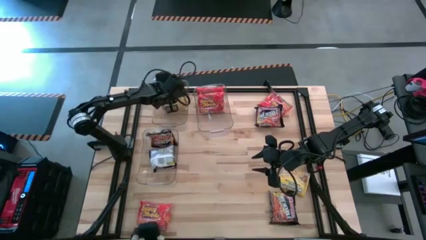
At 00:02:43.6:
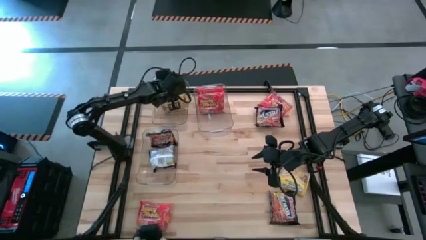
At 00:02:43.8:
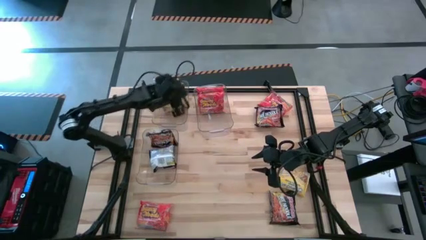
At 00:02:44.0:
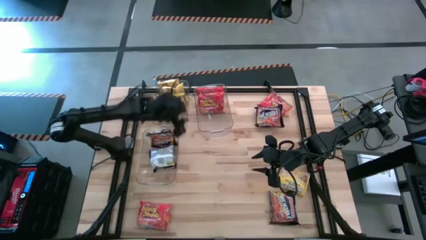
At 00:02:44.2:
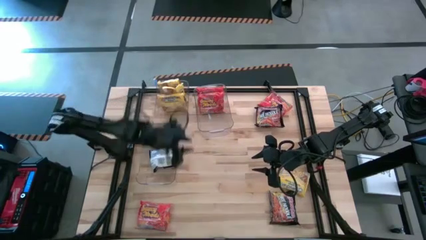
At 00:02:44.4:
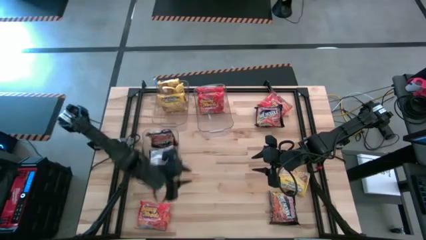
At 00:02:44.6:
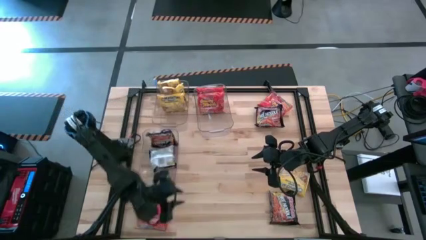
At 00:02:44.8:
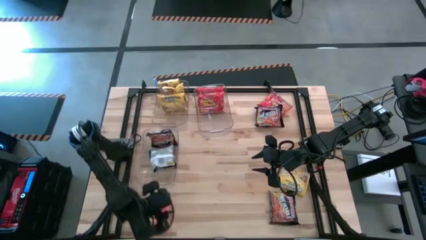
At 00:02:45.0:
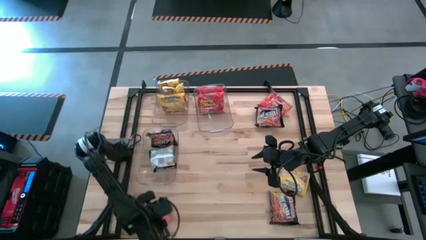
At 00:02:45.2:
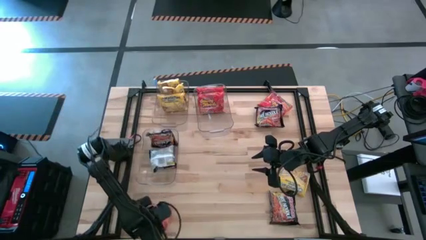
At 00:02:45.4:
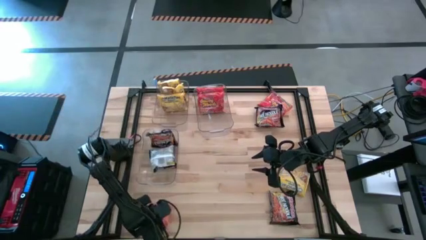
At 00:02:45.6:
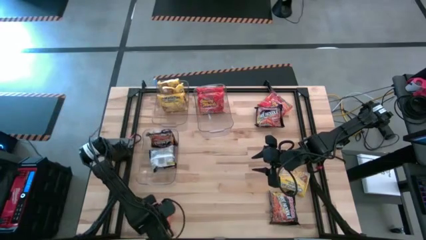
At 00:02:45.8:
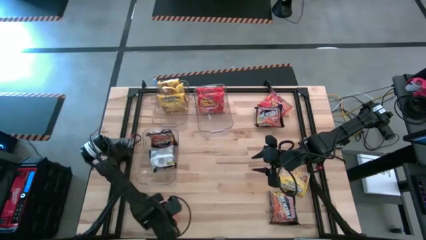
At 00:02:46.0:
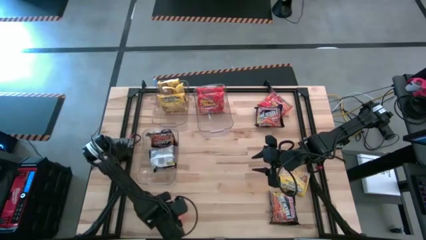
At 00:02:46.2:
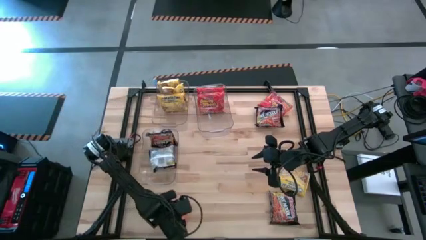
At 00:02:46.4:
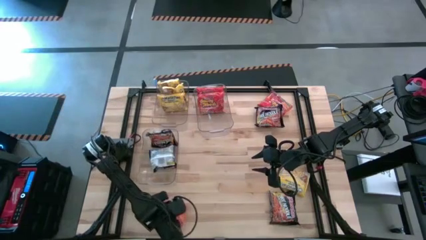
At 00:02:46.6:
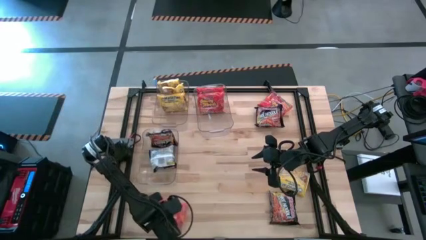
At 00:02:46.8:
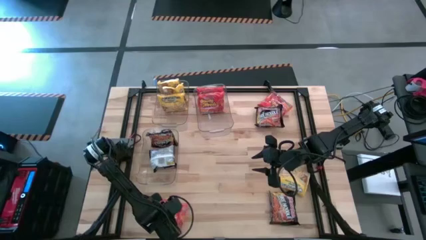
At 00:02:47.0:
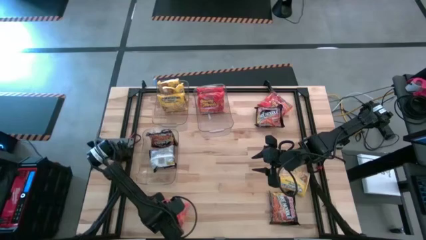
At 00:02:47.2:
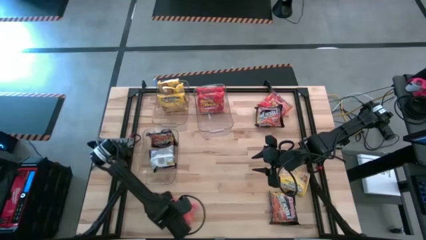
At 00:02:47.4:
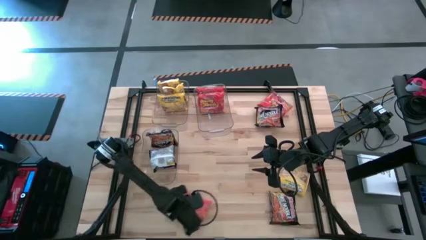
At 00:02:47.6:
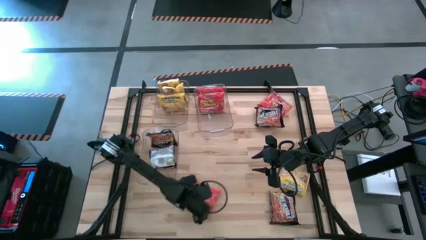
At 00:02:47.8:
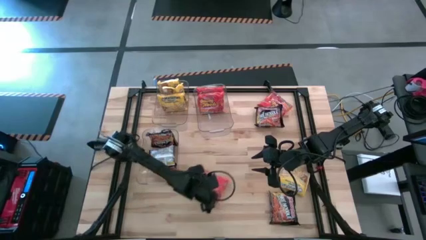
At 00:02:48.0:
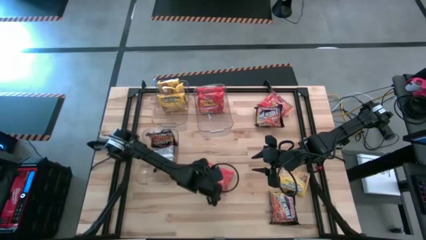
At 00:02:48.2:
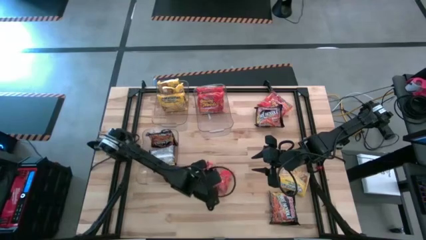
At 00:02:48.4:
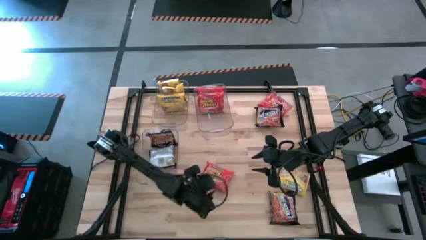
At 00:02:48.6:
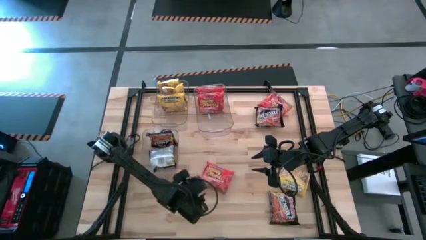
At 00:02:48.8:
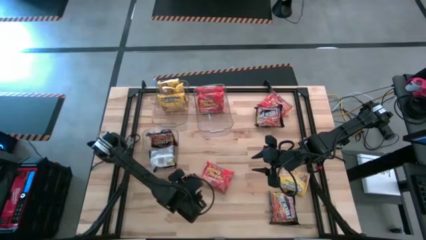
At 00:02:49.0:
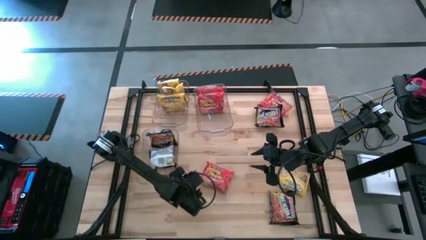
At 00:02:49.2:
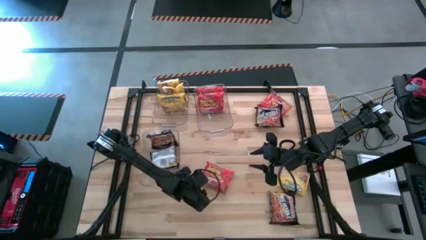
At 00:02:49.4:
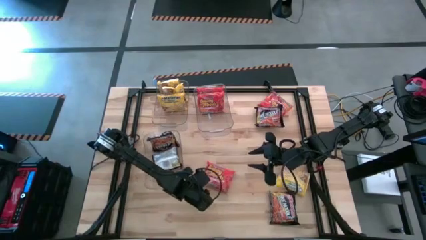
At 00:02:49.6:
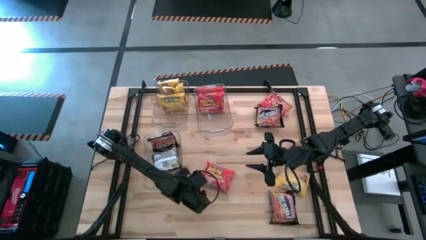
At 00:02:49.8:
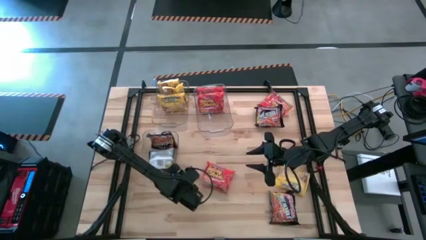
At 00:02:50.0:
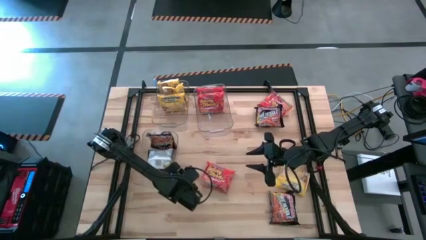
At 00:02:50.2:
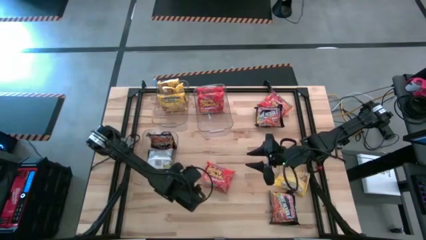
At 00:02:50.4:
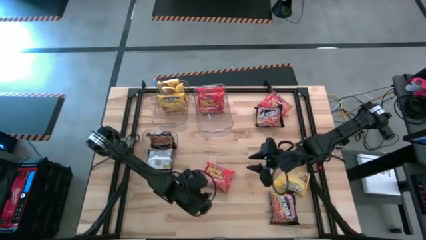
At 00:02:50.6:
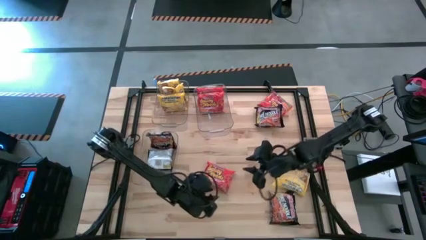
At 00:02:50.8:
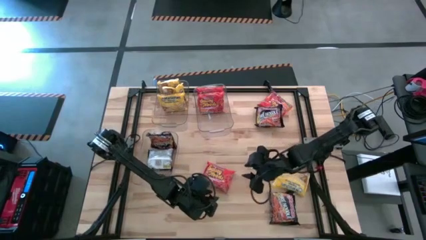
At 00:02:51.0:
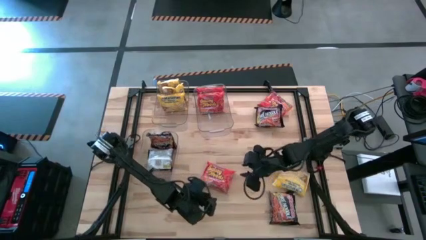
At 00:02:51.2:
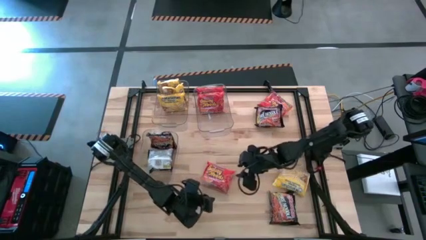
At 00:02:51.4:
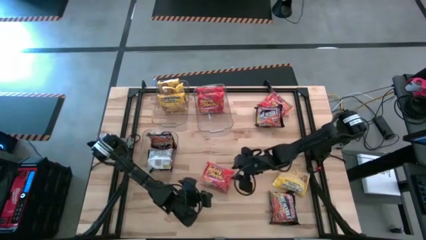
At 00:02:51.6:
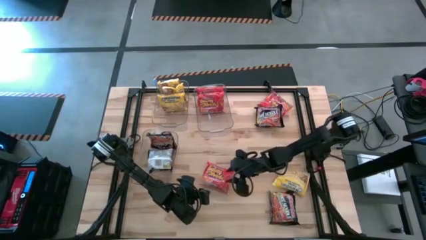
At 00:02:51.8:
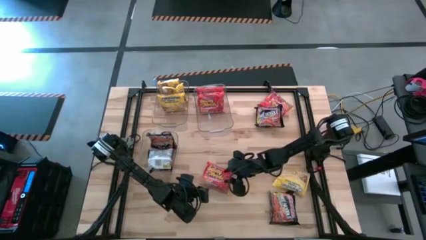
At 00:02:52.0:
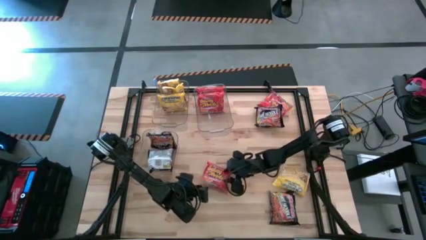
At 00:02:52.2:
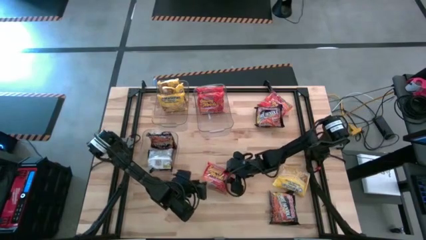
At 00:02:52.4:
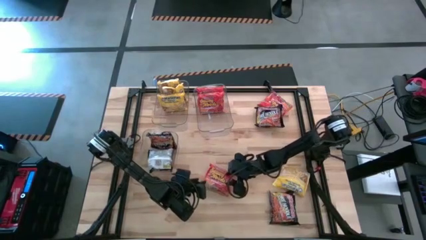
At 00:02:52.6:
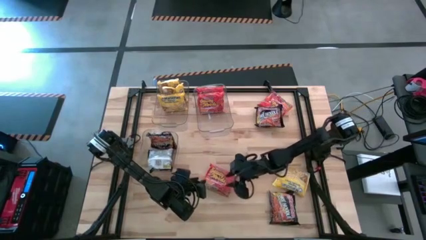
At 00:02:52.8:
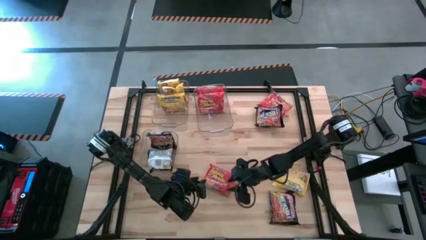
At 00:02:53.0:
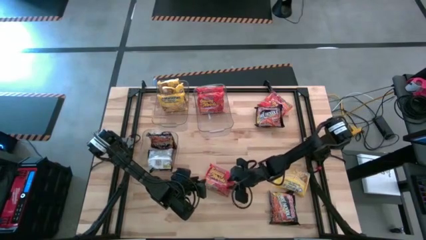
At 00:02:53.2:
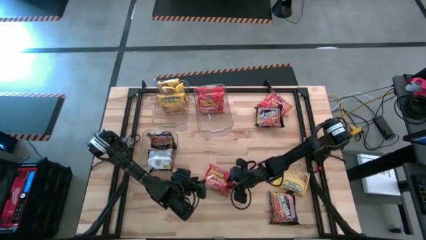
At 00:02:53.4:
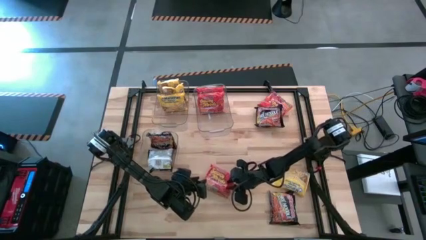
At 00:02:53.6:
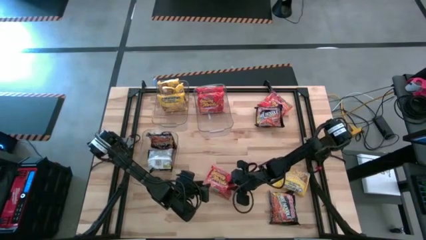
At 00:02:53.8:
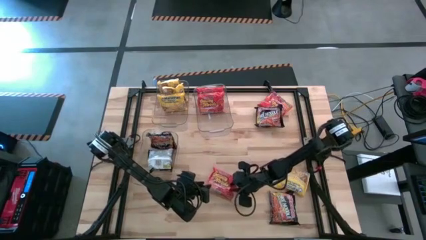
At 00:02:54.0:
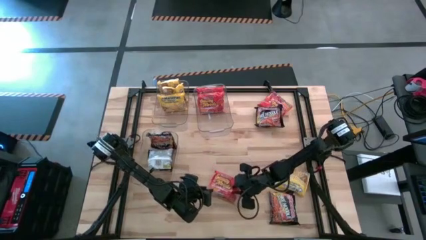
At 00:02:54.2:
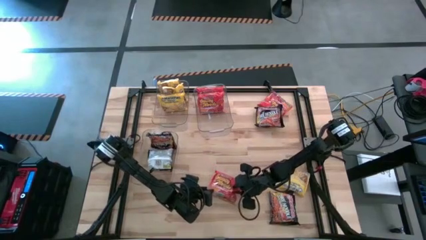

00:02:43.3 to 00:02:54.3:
Task: Sort Maruchan noodles
Put the orange noodle pack into the top right transparent bin

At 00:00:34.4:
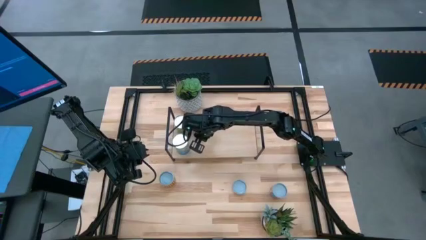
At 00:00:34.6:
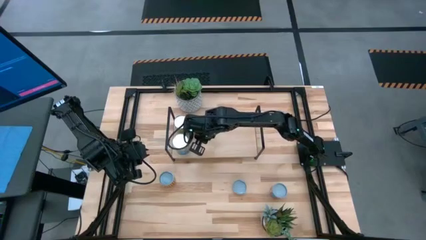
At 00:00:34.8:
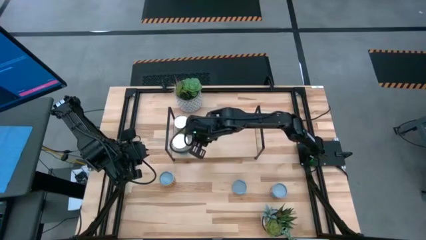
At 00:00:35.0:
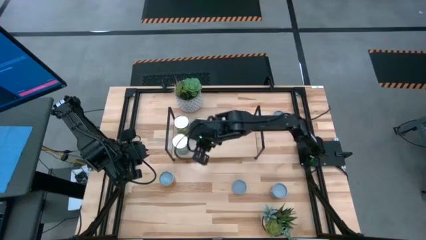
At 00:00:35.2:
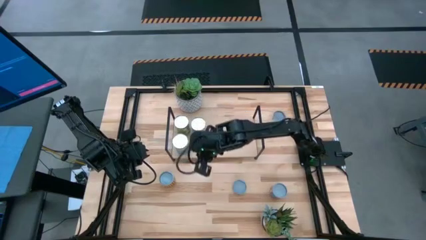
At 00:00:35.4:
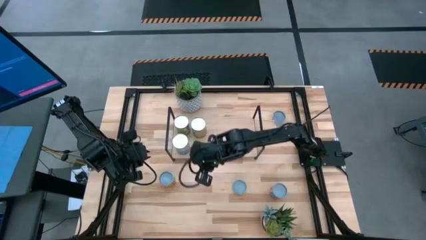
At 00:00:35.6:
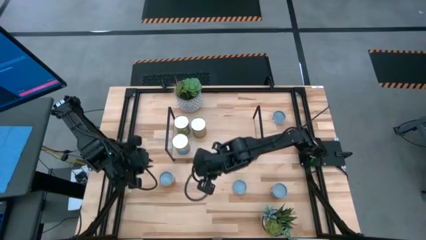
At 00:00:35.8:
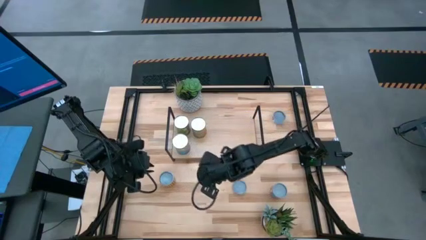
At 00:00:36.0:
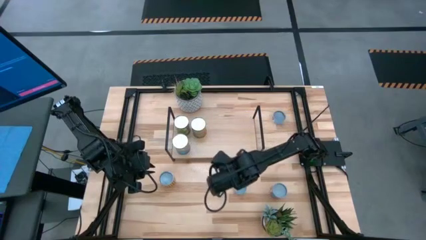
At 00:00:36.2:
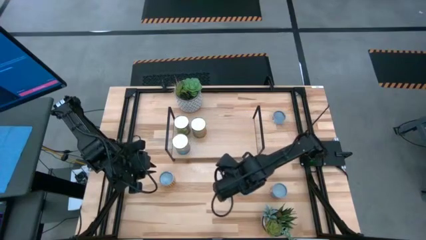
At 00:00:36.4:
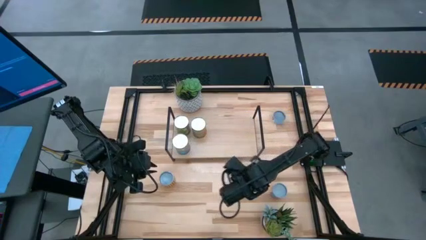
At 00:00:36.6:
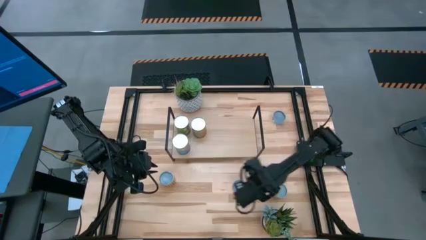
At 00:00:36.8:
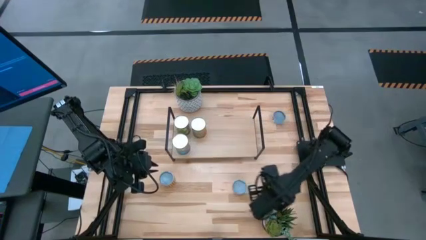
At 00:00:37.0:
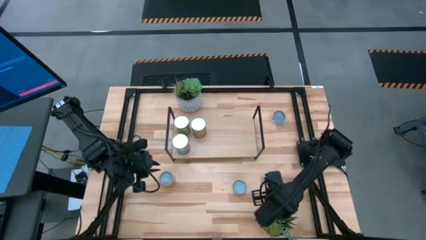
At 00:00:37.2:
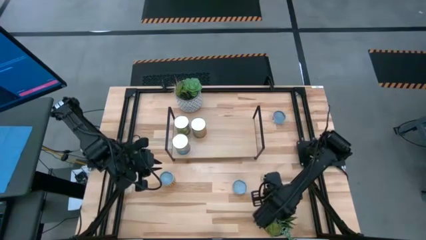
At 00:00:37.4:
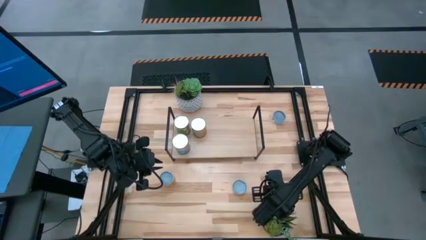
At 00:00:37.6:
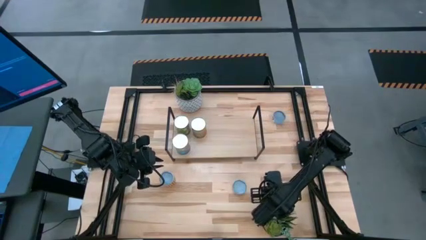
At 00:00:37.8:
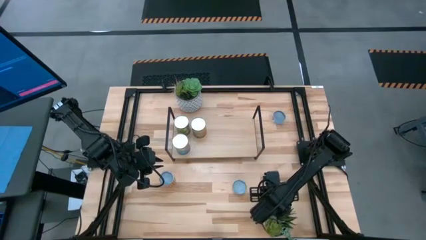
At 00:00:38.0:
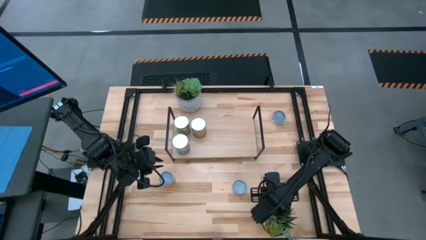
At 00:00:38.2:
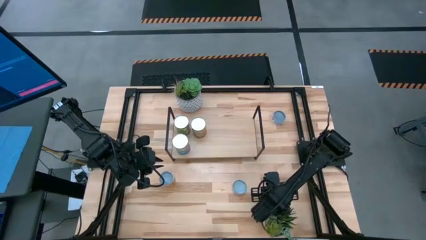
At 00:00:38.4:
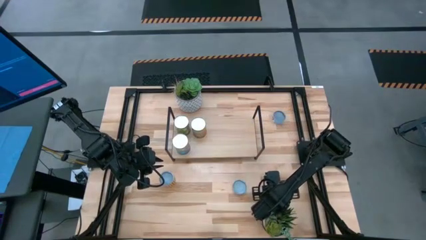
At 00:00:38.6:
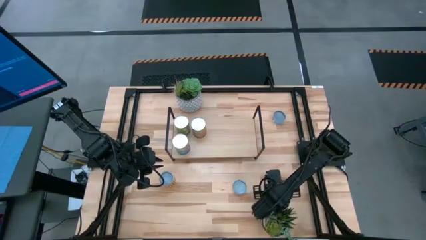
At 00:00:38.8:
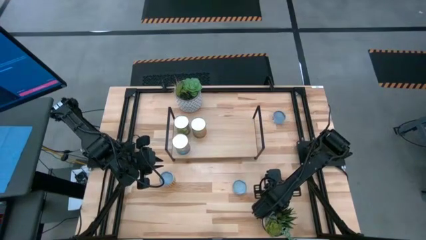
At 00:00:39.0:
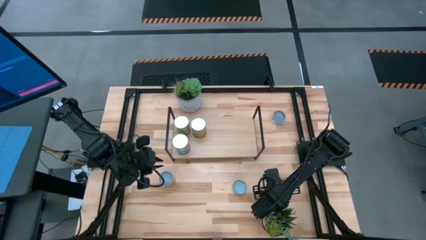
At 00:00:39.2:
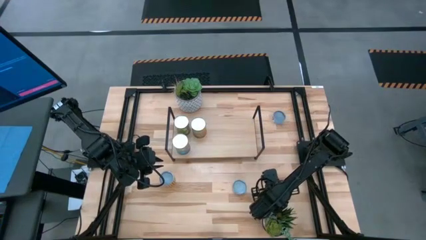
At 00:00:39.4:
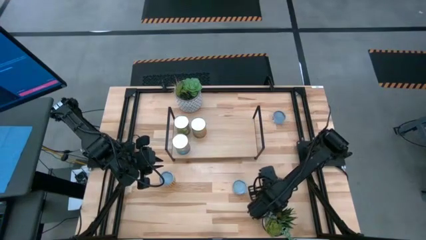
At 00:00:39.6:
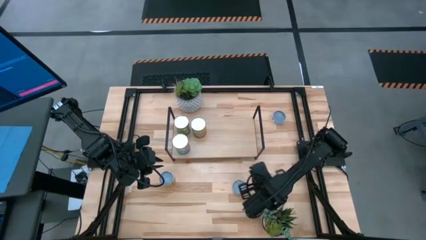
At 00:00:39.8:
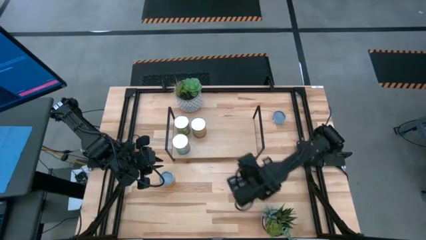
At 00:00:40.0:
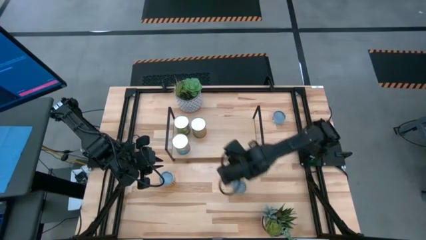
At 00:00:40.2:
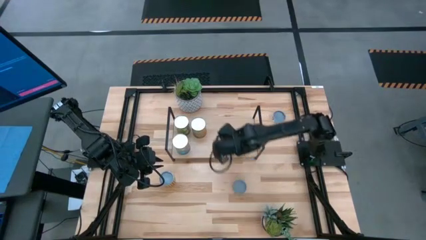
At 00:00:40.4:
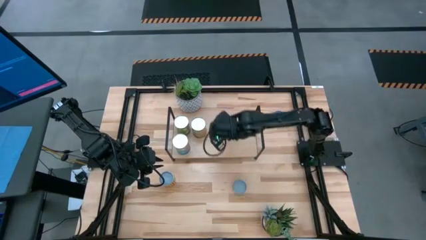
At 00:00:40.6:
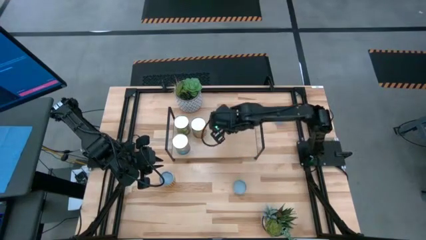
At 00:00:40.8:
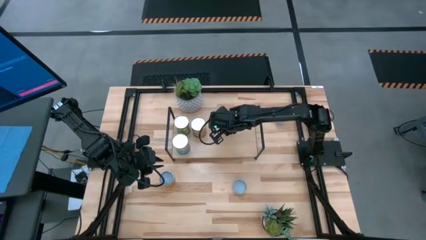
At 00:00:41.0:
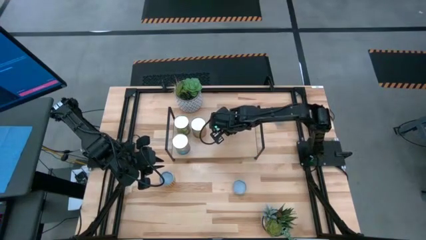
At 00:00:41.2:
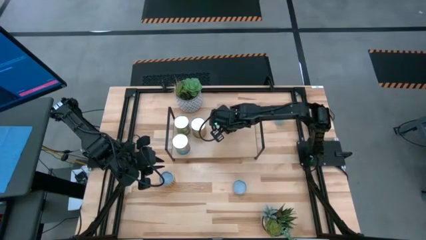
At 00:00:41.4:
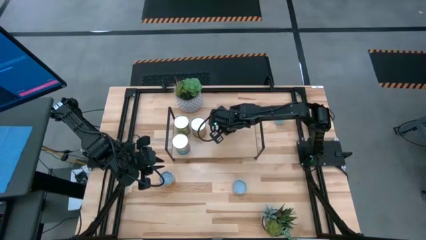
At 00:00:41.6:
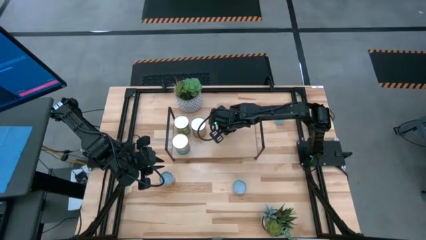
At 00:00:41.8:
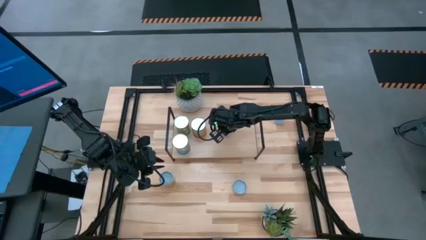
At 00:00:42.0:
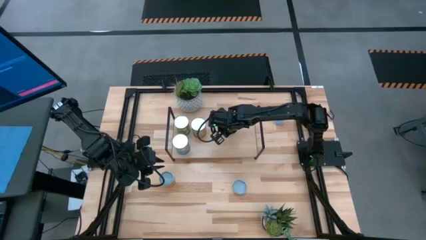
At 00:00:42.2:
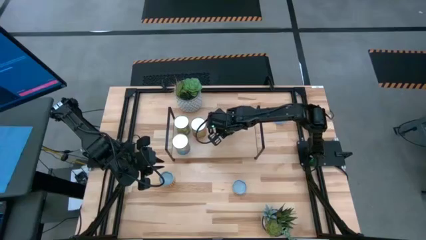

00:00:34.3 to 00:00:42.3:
Task: Pick and place cans onto a shelf
Put the canned corn on the shelf
